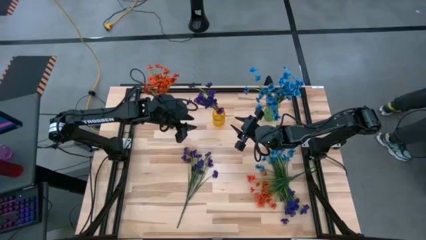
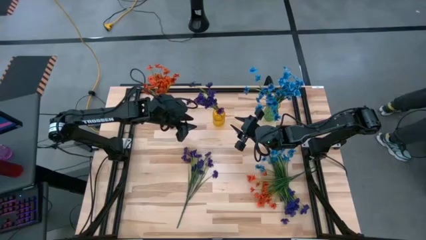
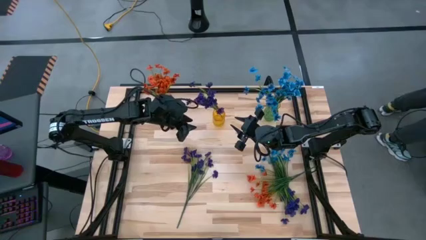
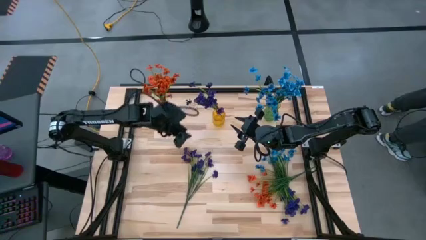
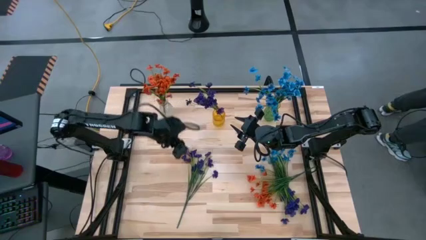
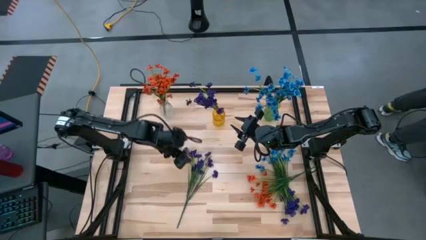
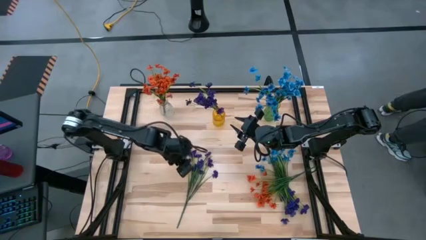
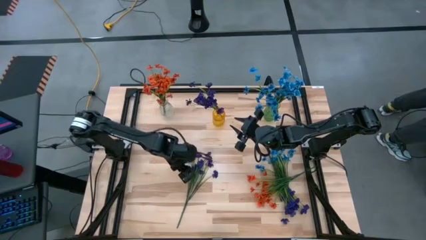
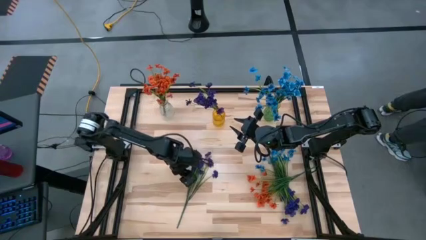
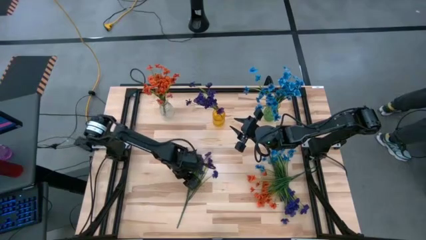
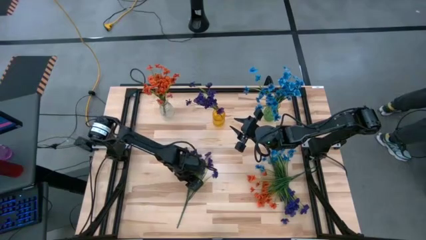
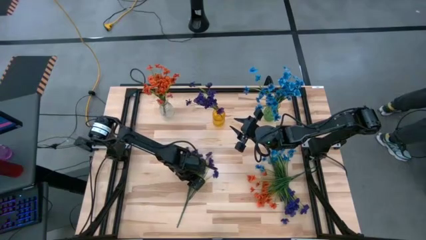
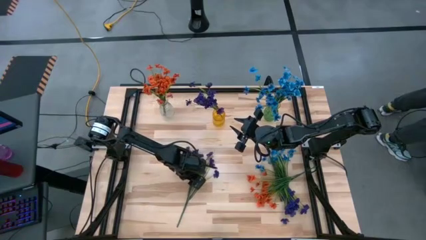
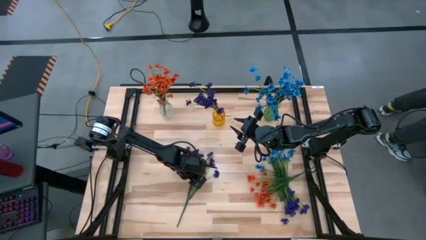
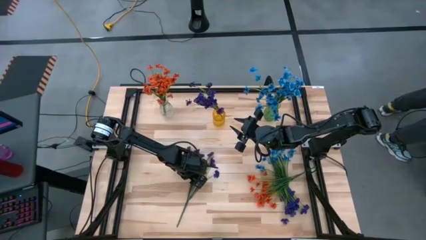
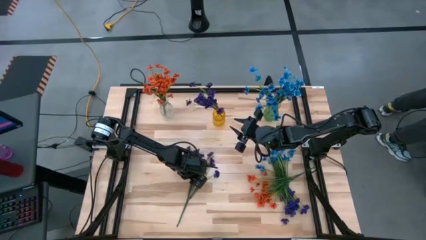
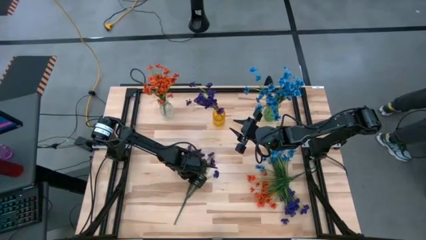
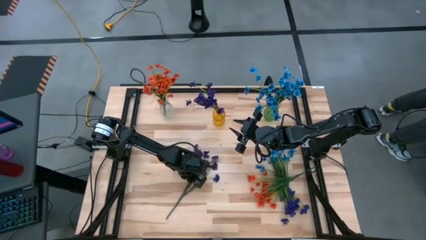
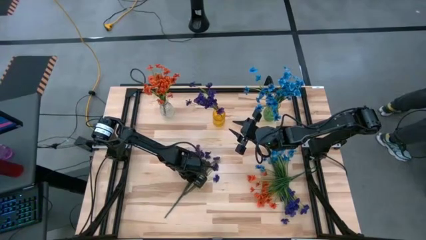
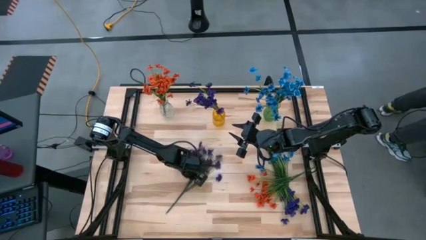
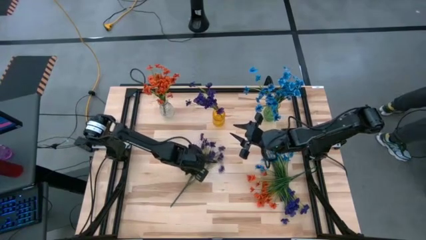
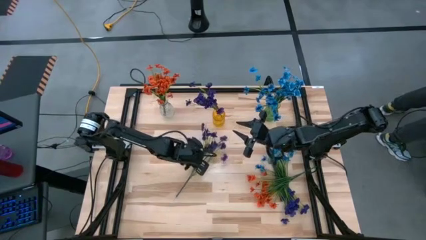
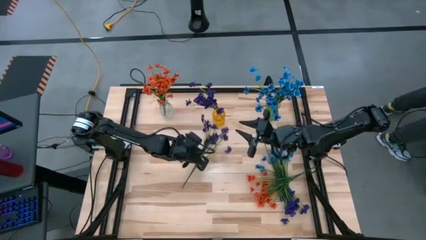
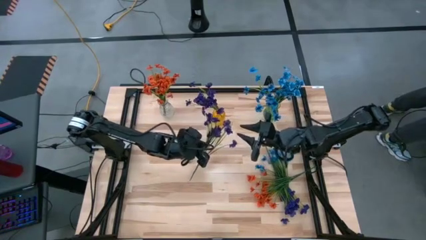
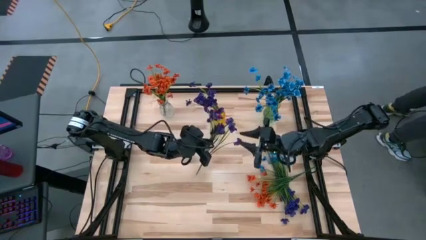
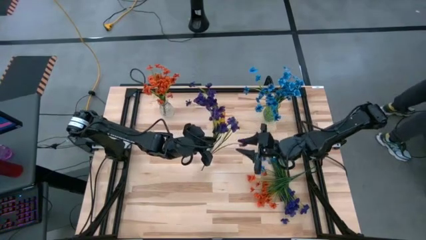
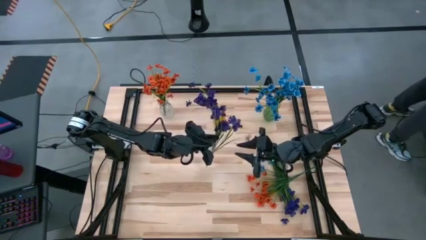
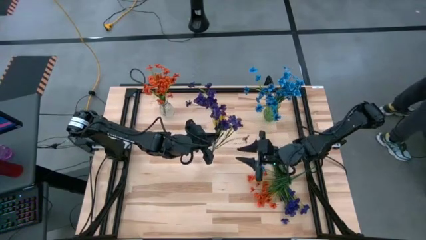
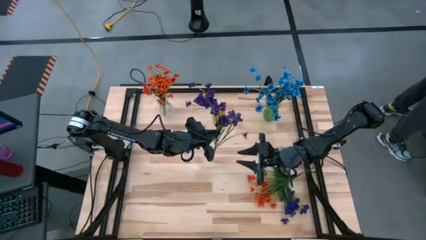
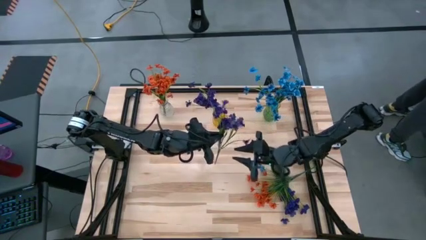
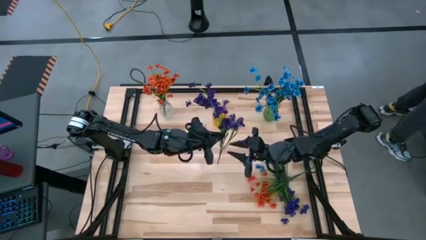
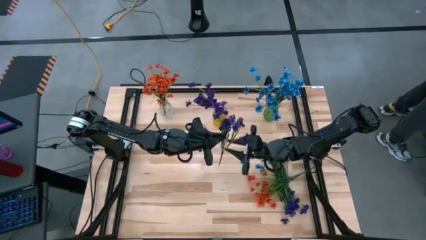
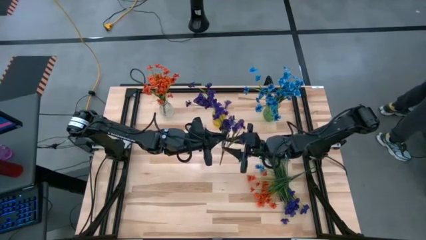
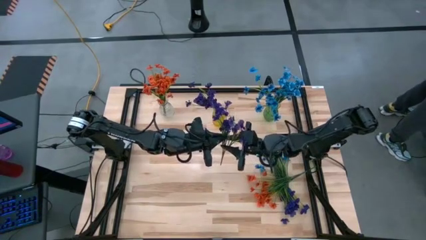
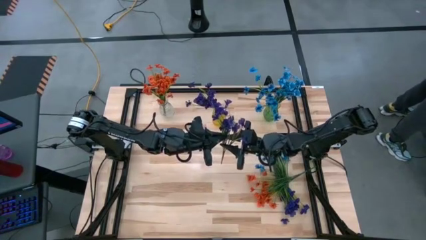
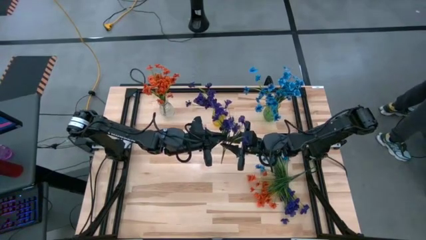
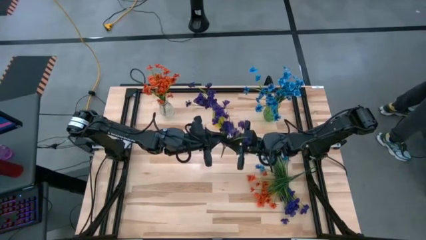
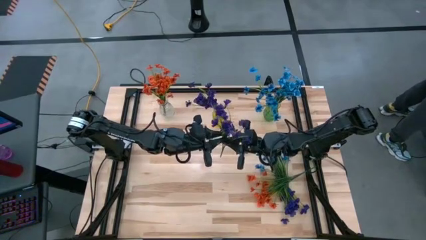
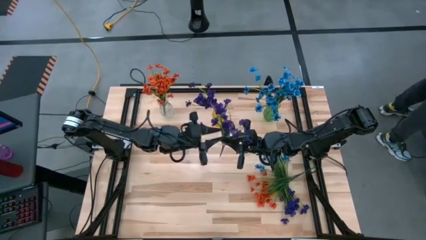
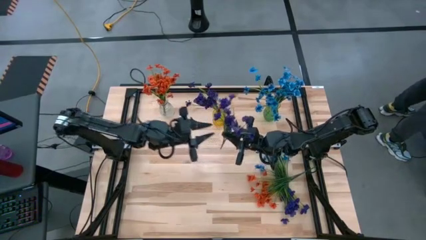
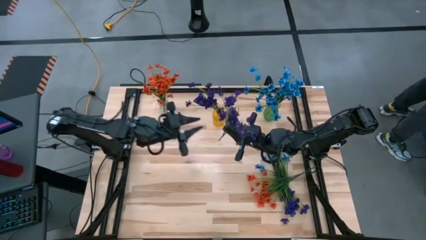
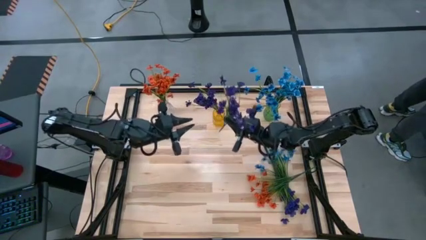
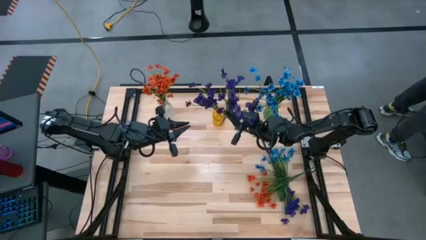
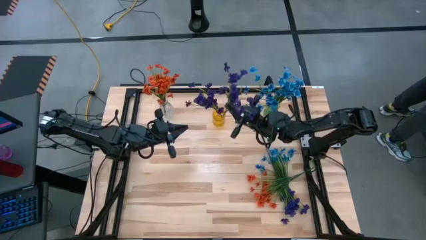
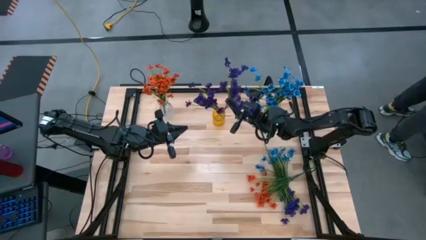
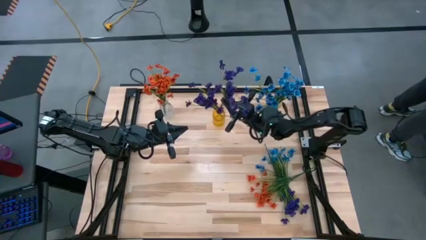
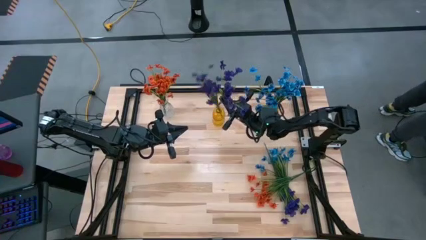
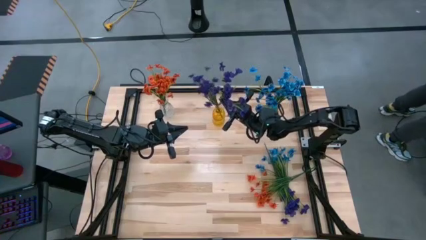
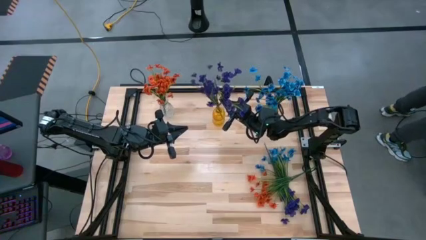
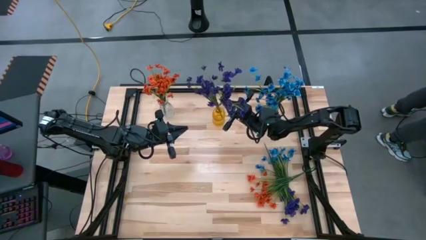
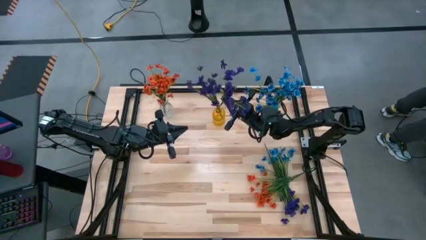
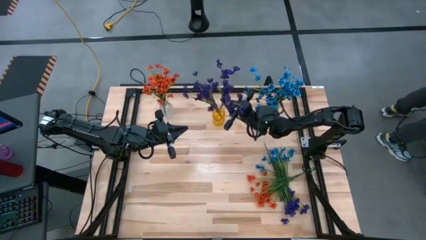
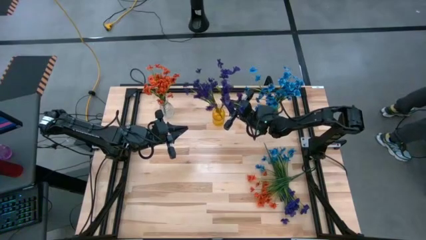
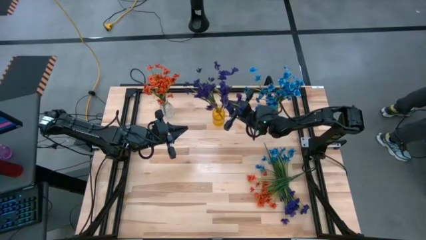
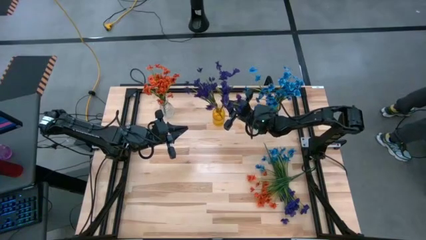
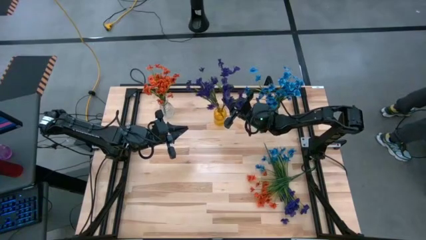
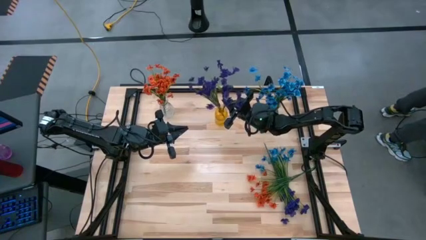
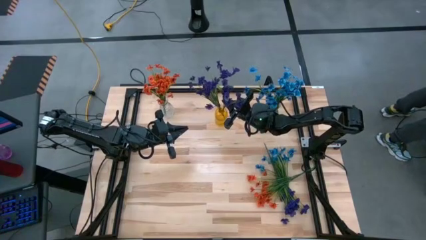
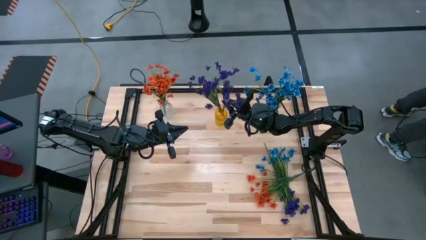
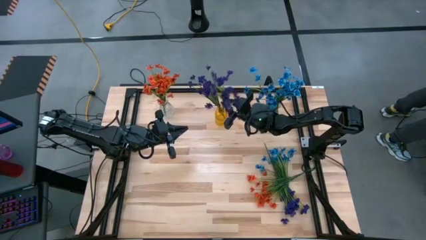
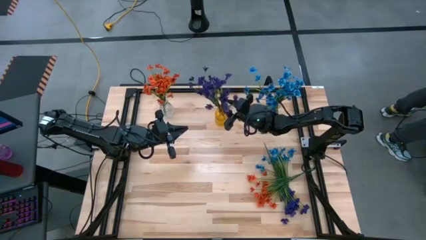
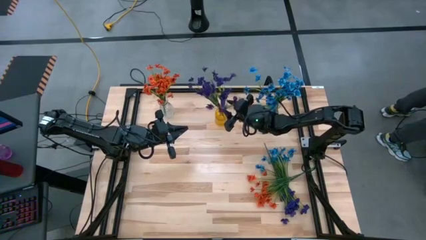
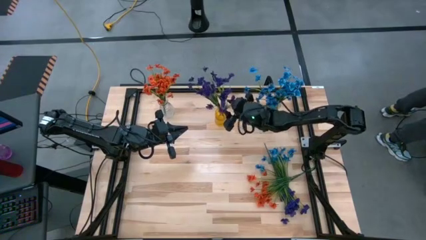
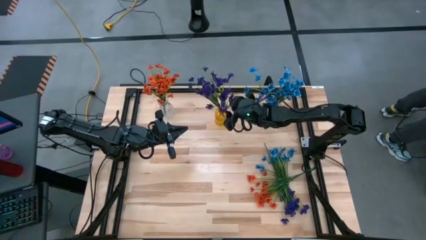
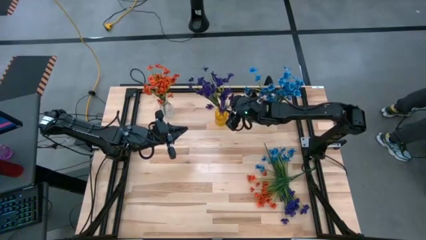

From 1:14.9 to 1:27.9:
Task: Sort flowers into vase by color
Put the left purple flower into the orange vase
